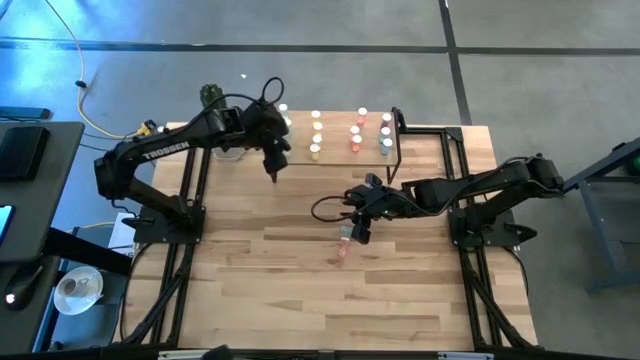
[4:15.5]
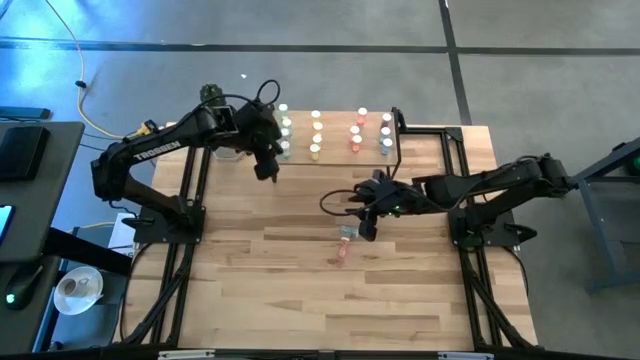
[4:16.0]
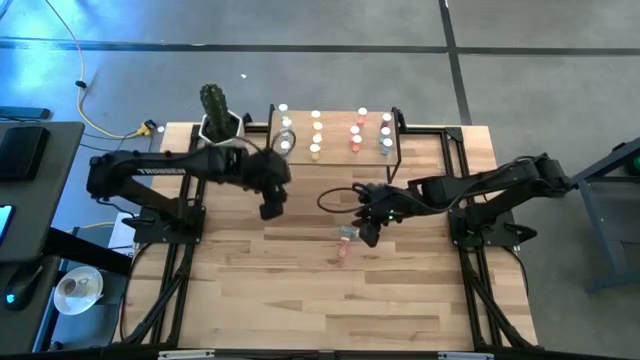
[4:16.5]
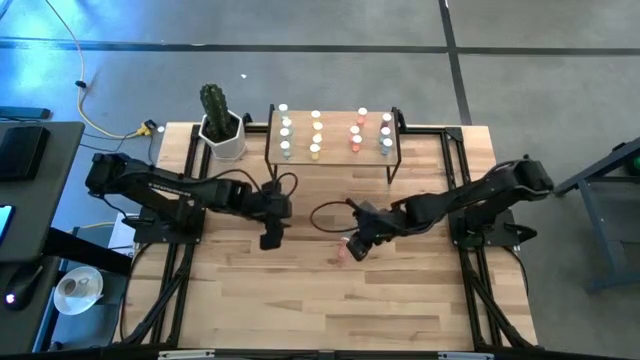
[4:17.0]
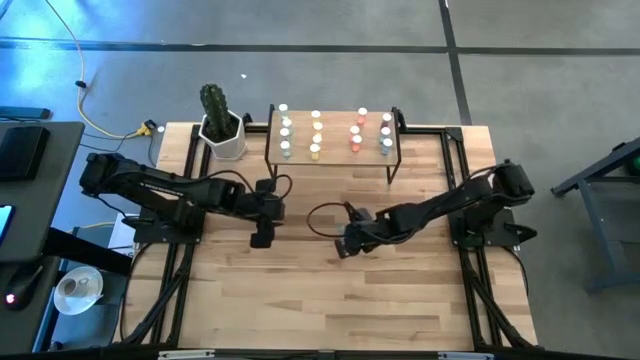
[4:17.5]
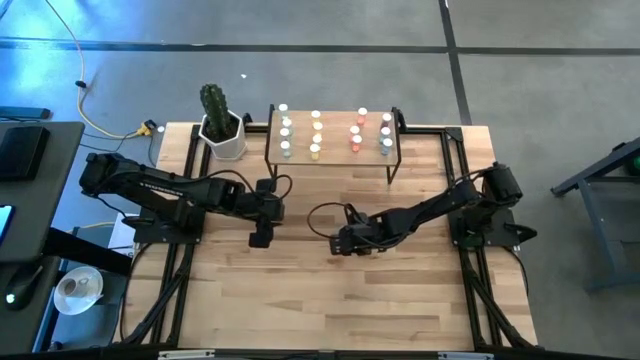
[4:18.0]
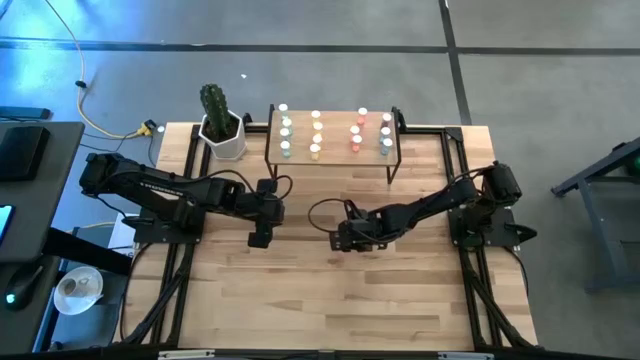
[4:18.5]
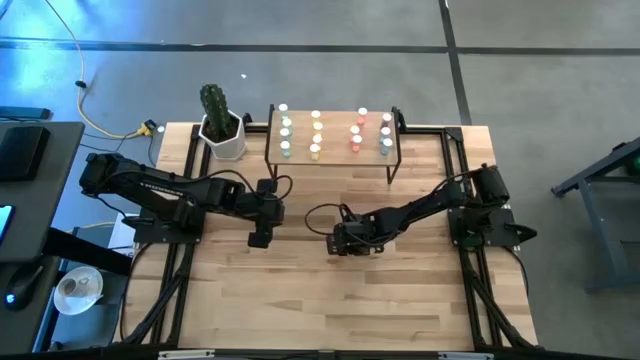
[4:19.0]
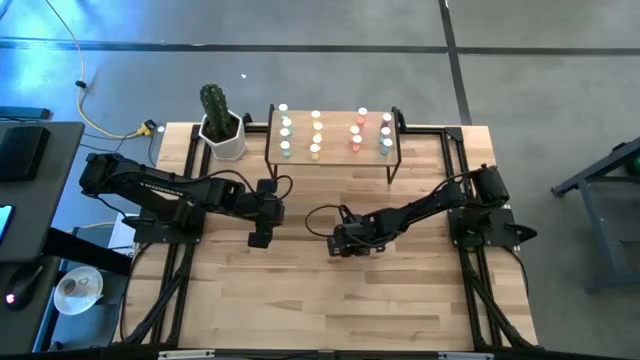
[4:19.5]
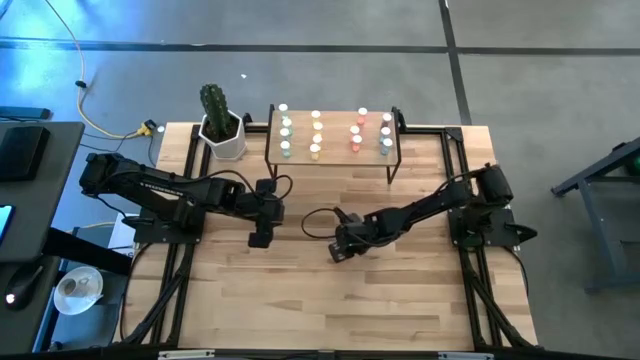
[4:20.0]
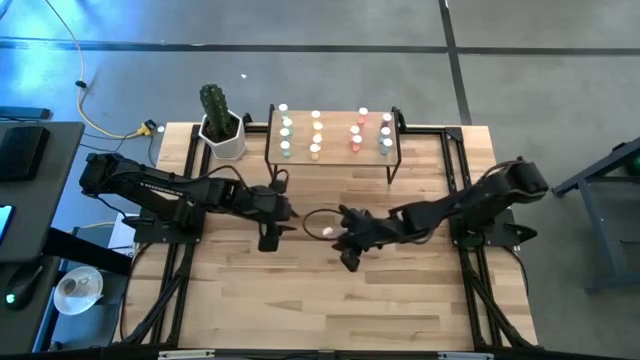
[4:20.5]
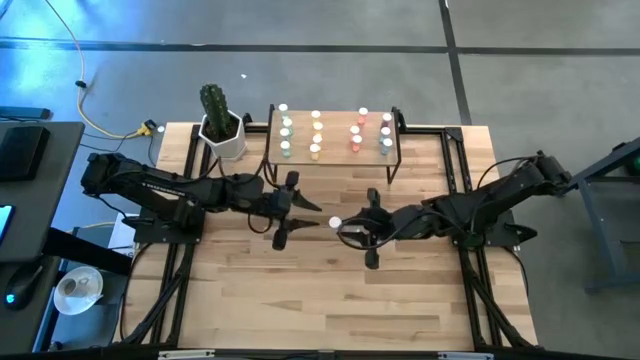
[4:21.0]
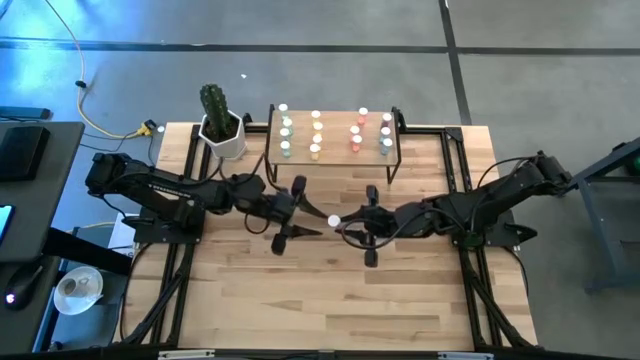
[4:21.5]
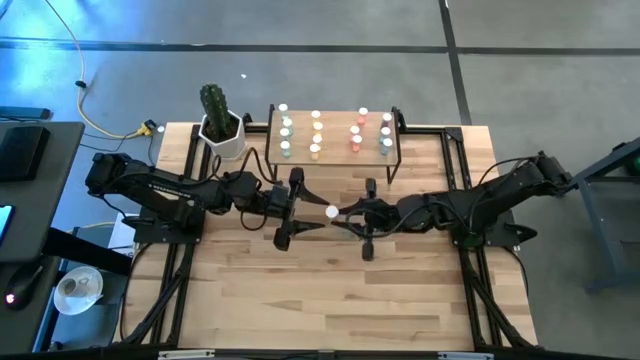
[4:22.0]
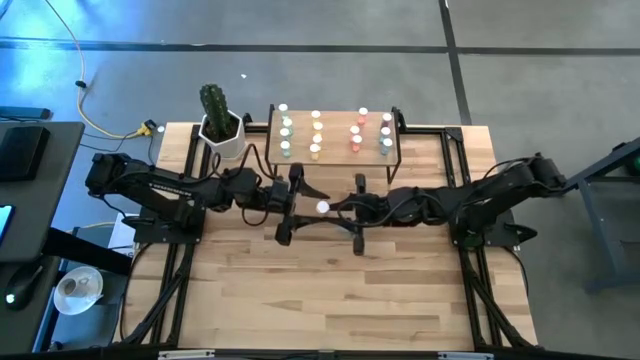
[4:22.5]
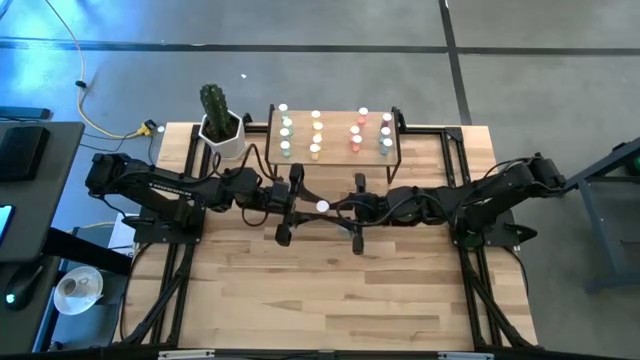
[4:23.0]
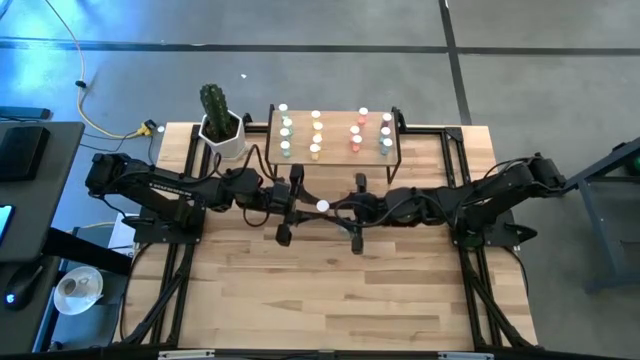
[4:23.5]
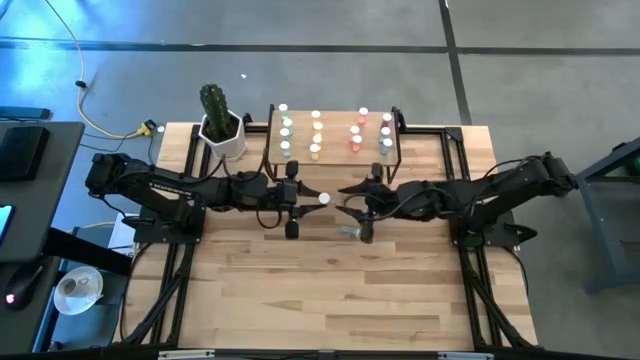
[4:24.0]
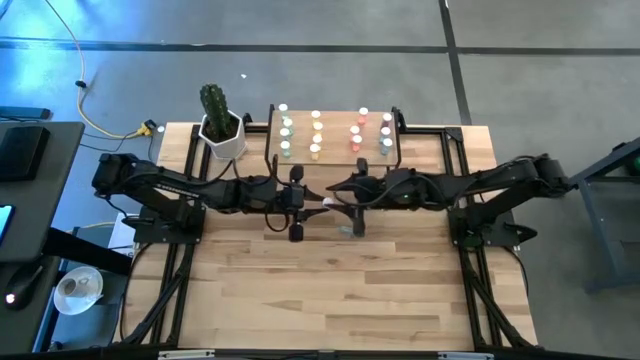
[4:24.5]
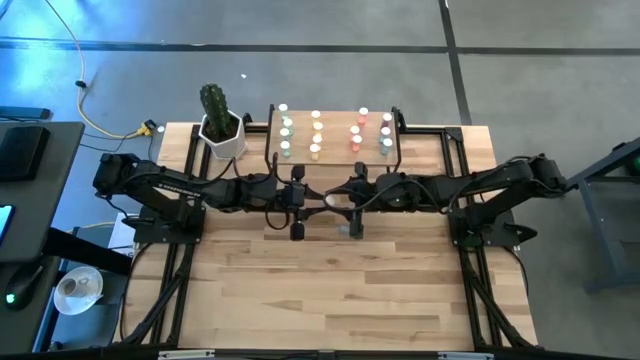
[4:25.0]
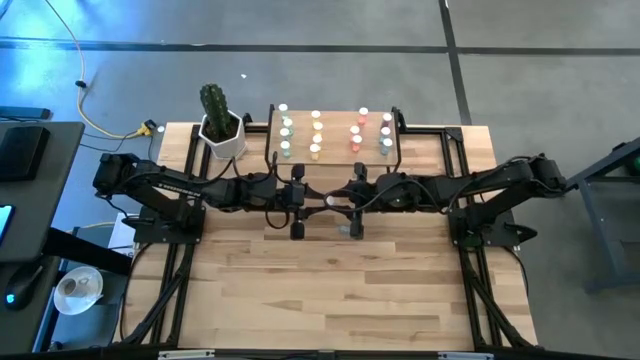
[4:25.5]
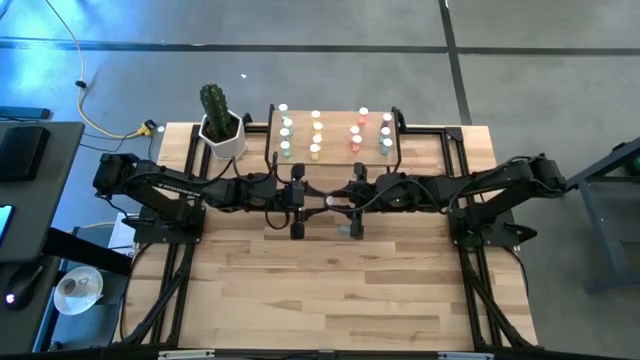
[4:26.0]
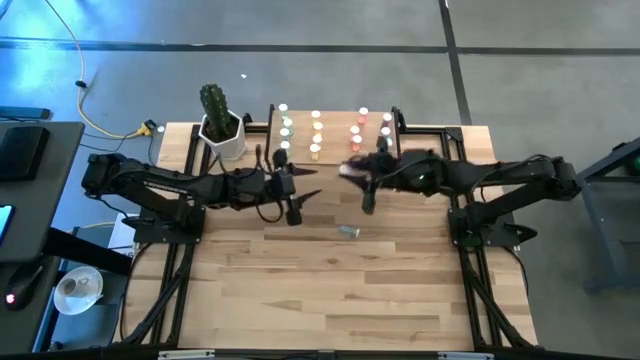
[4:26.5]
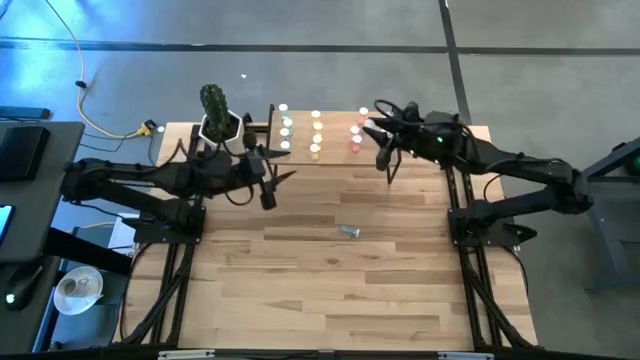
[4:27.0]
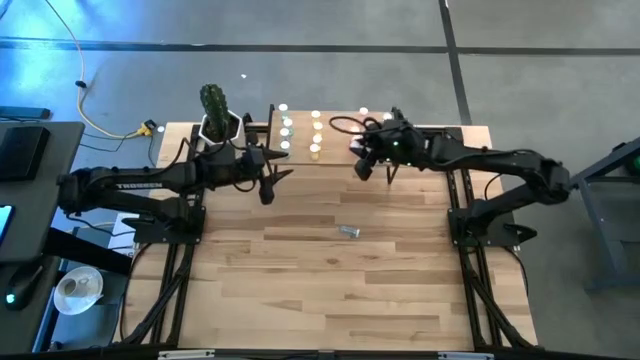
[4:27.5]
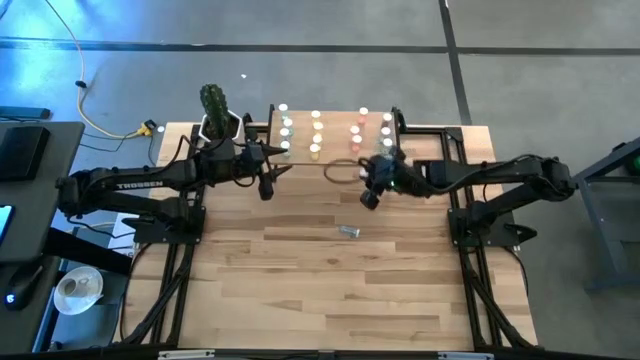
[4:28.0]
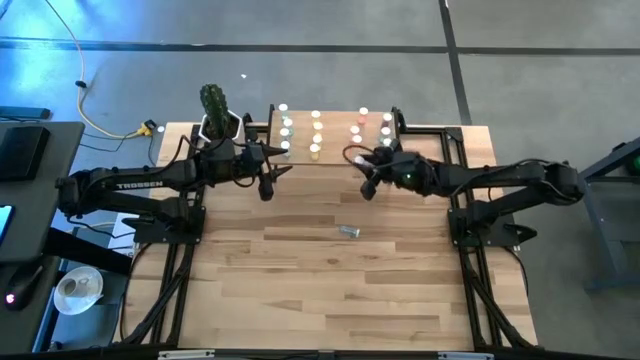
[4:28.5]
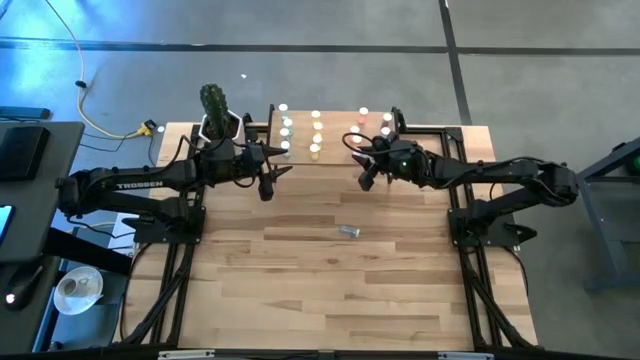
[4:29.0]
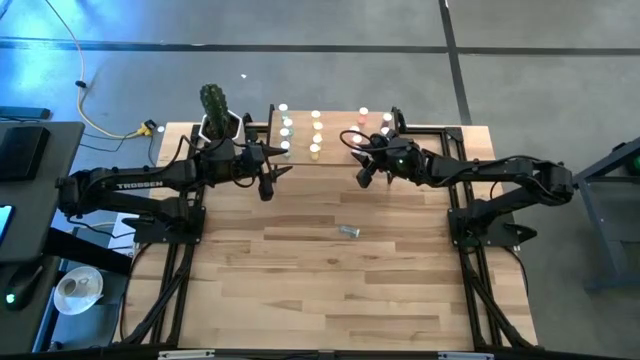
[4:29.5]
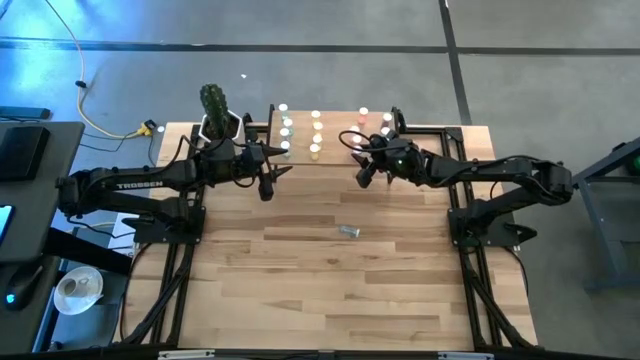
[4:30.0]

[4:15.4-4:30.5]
Task: Pick and place medicine bottles onto shelf by color
Put the orange pill bottle on the shelf

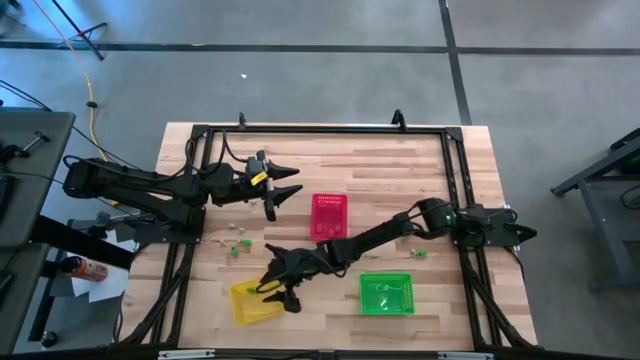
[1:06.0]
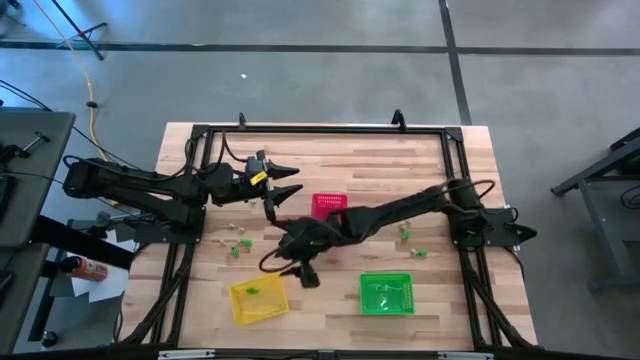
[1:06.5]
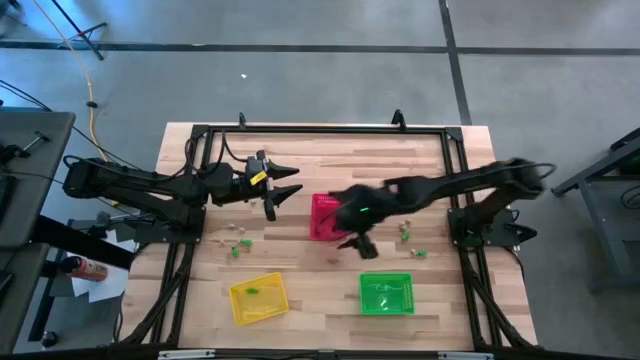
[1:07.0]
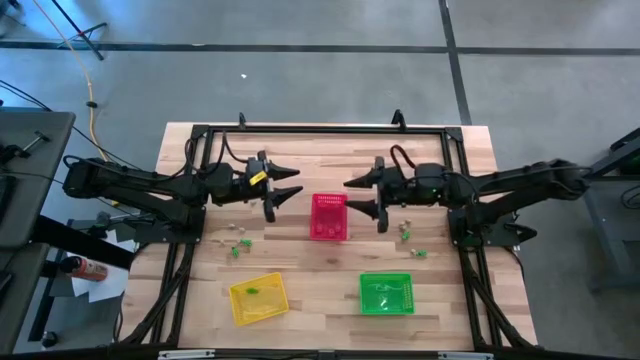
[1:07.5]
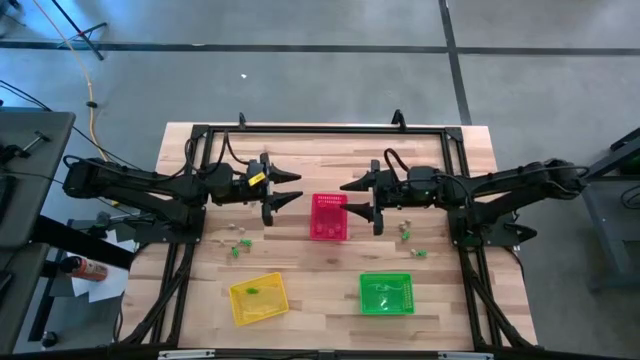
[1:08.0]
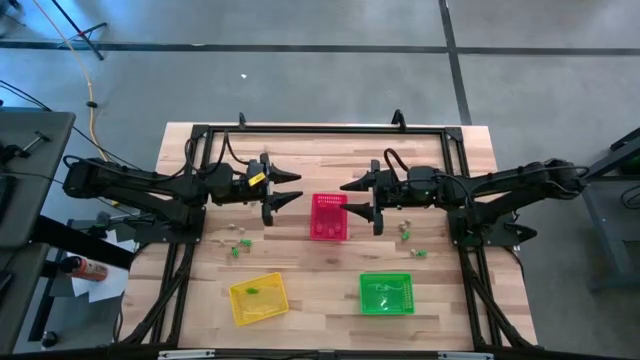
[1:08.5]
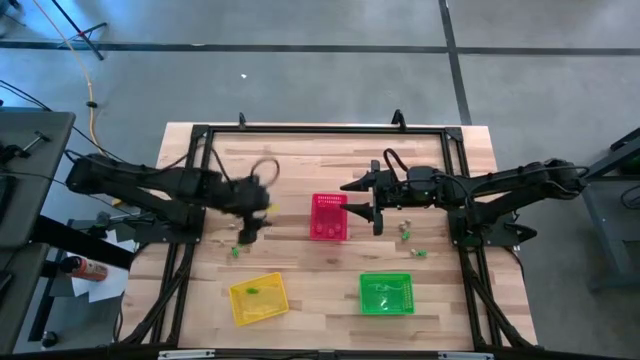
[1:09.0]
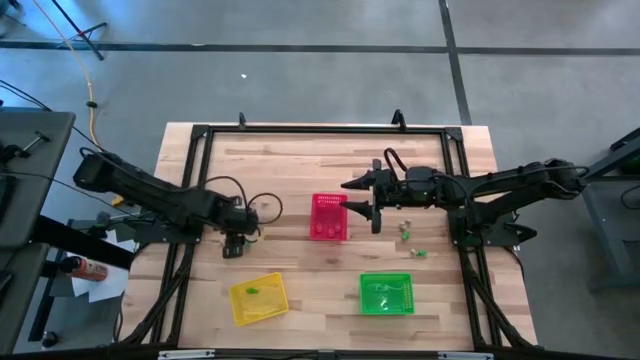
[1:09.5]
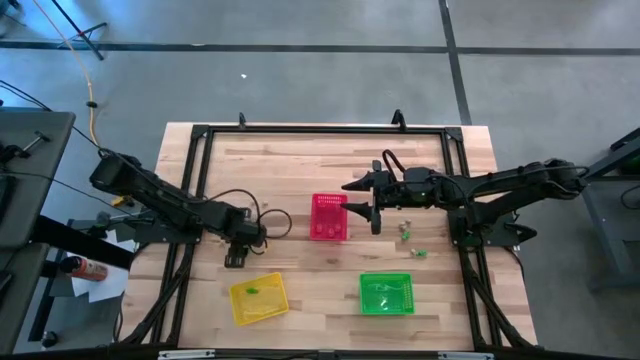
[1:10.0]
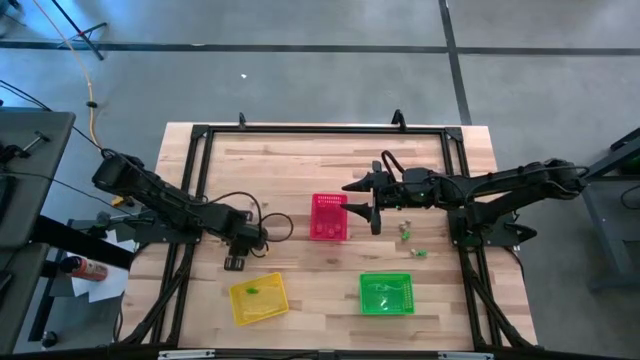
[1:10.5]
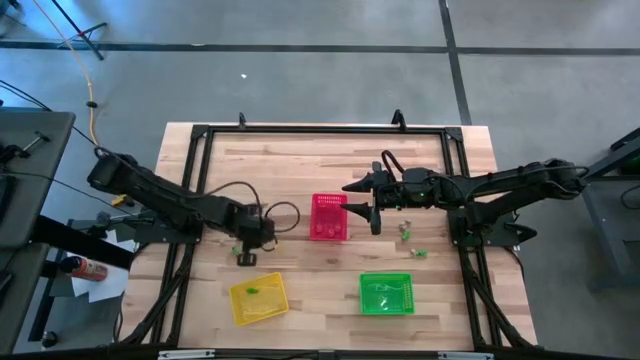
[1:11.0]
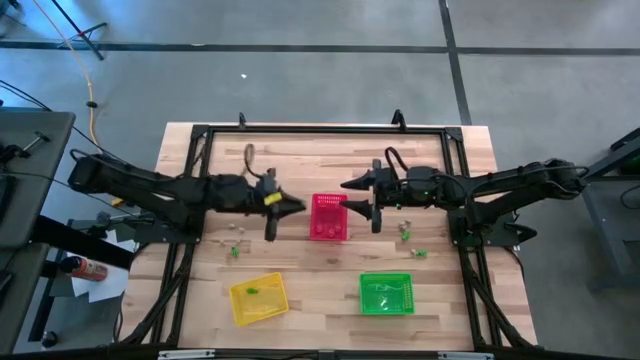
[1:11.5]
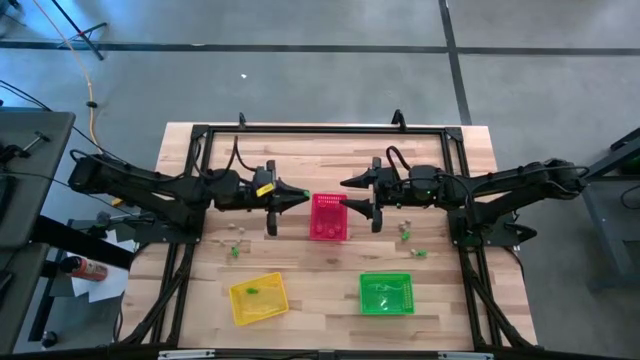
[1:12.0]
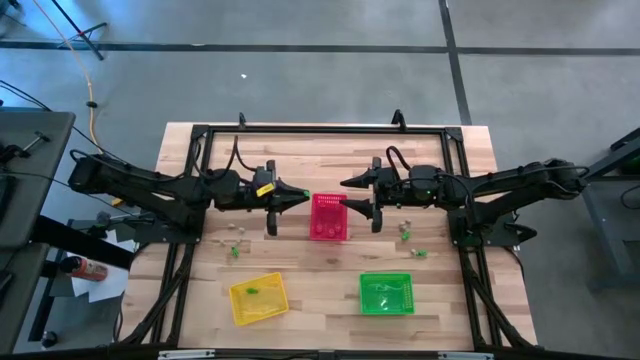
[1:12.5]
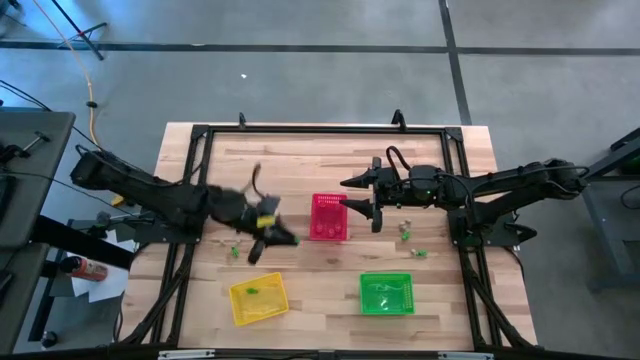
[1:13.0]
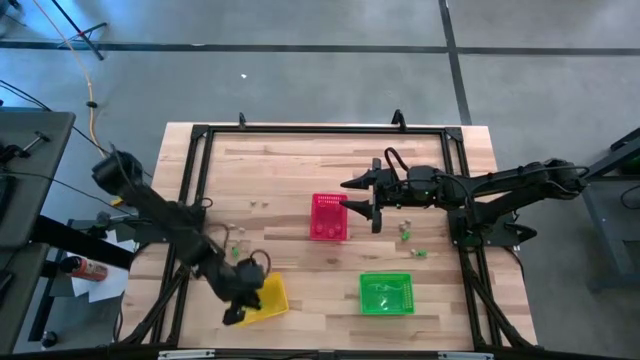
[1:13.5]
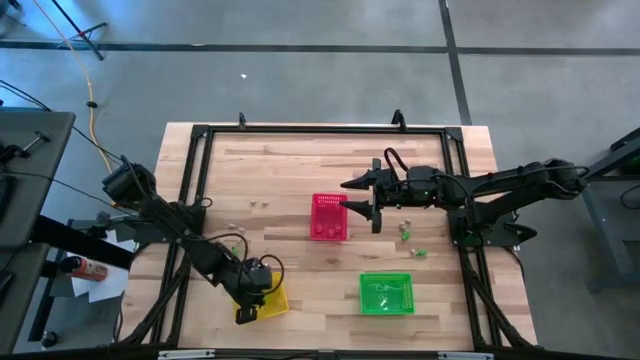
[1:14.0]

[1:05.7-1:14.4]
Task: Sort Halloween decoration
Put the green skeleton toy into the yellow bin
